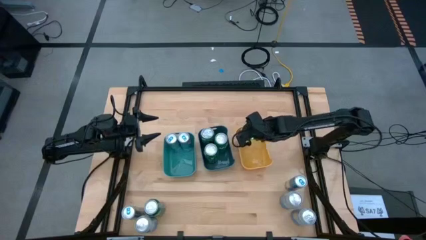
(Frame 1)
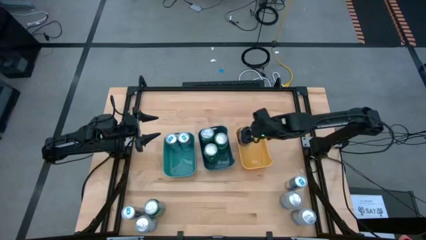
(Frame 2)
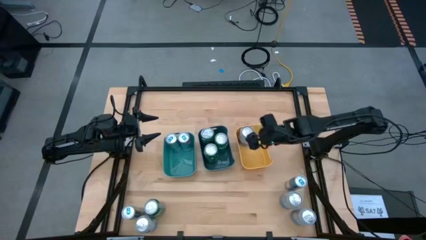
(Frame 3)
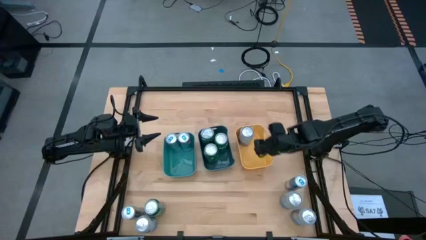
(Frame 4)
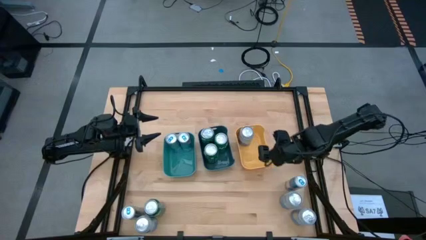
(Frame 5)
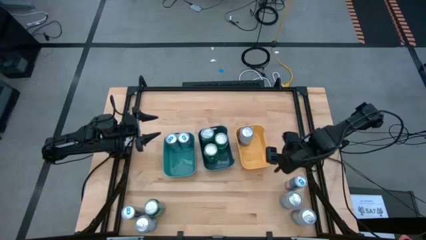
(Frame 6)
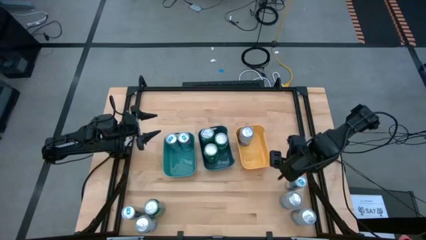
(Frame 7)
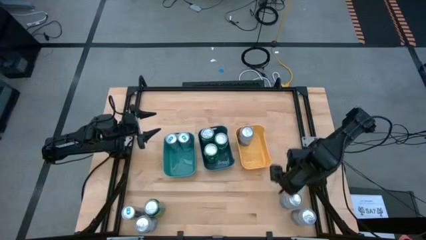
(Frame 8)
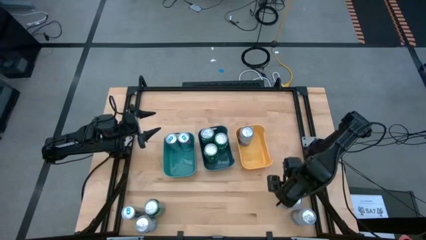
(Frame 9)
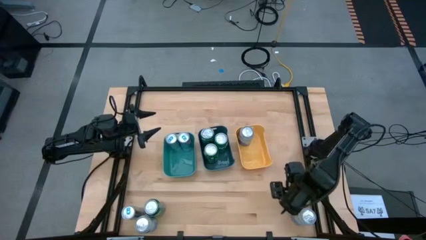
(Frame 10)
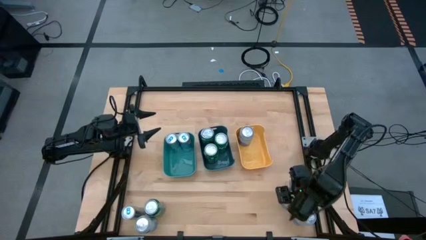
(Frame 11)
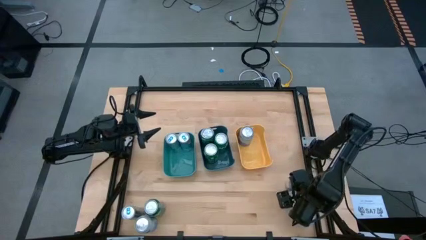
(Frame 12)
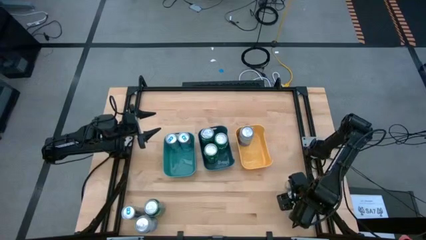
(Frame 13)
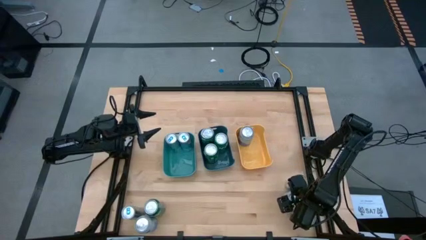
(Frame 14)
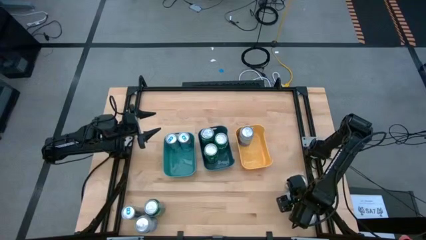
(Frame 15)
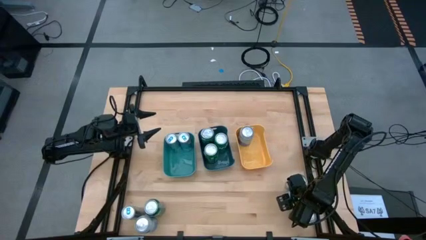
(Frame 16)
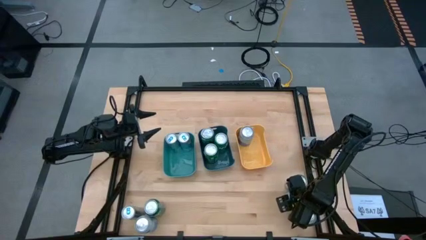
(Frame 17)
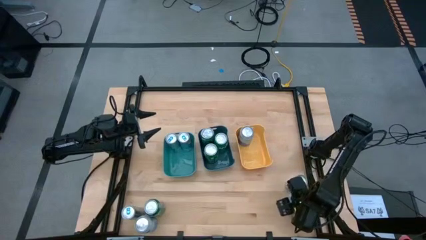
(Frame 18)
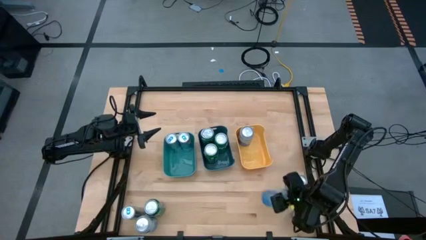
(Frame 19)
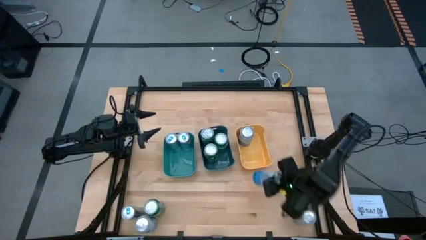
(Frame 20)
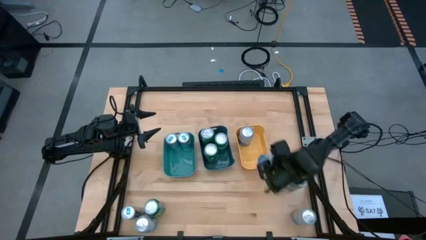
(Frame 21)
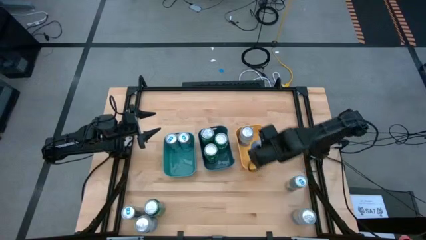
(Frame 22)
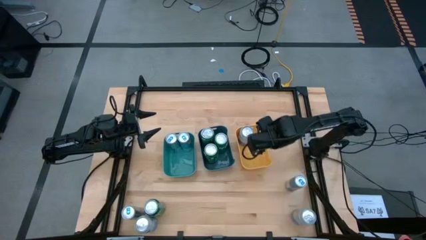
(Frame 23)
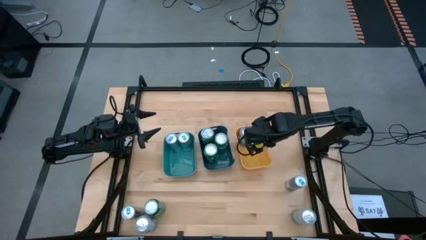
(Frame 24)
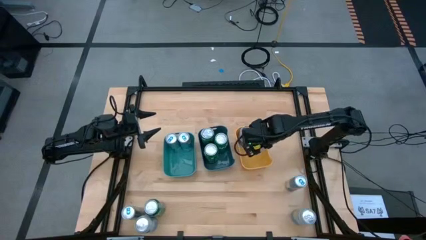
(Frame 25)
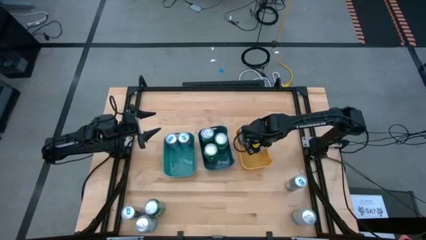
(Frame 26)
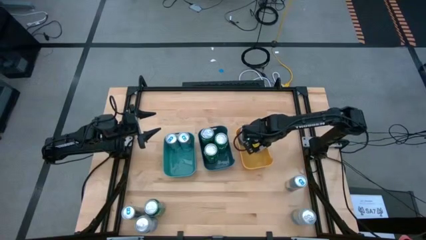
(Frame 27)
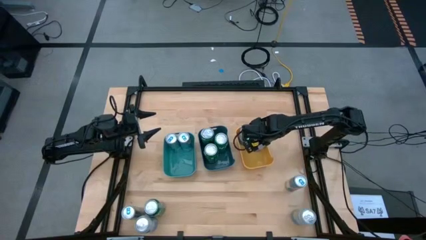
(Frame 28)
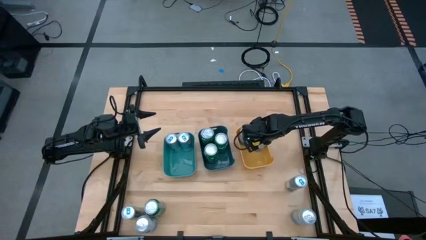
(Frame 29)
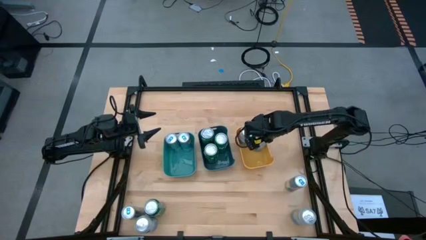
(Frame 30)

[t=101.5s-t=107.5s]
Task: Sort soda cans
Put the top blue/white soda can into the yellow bin

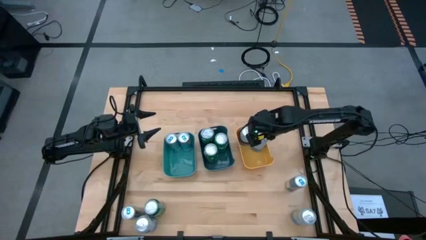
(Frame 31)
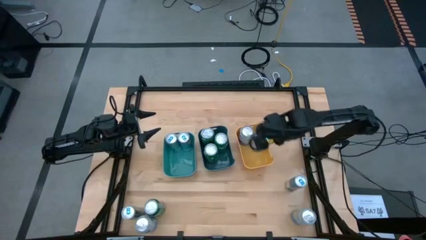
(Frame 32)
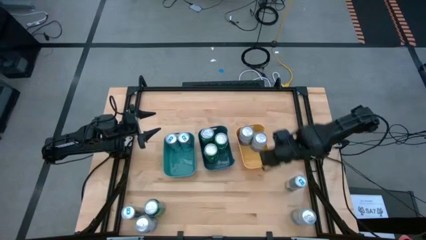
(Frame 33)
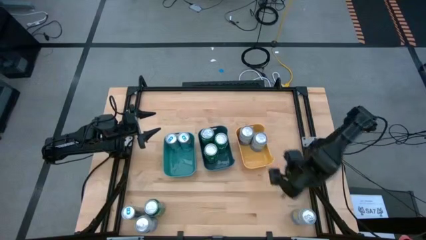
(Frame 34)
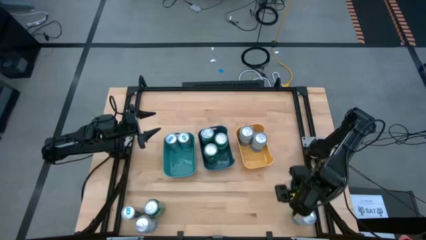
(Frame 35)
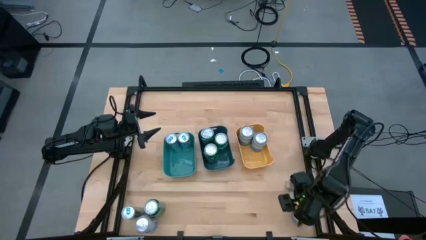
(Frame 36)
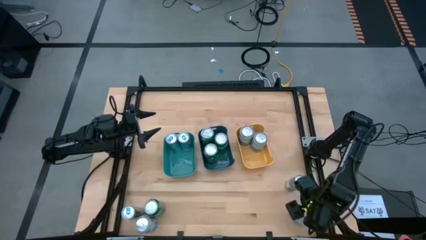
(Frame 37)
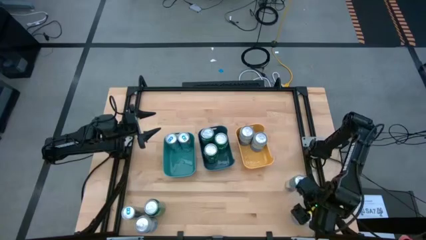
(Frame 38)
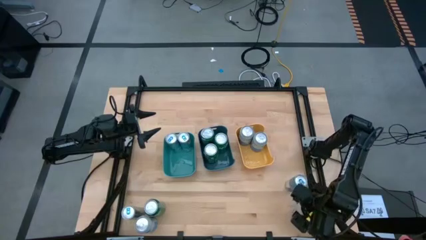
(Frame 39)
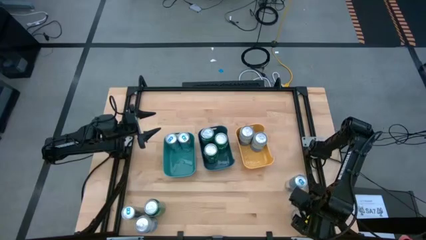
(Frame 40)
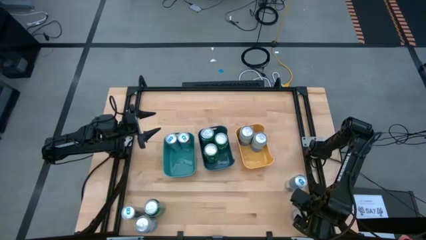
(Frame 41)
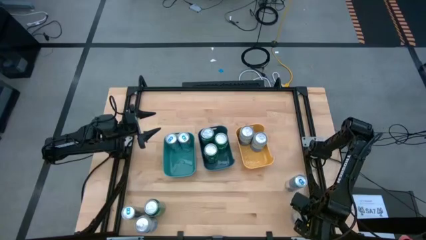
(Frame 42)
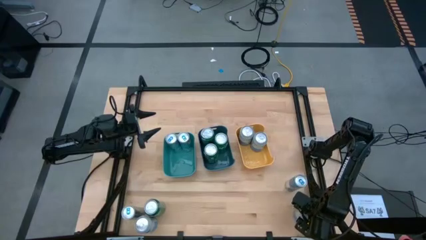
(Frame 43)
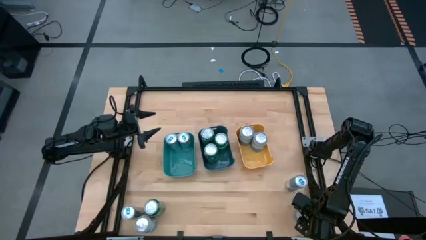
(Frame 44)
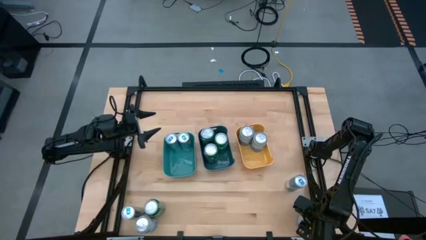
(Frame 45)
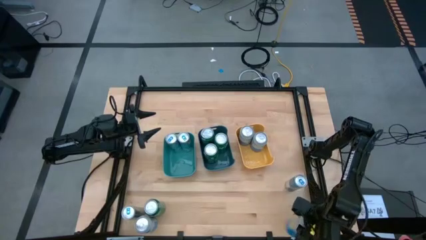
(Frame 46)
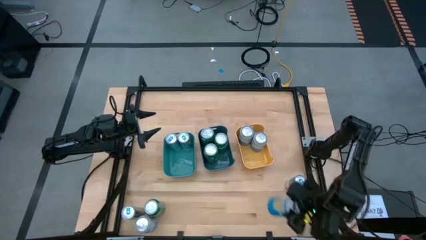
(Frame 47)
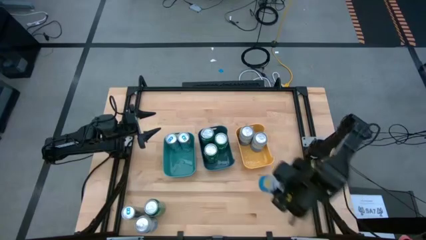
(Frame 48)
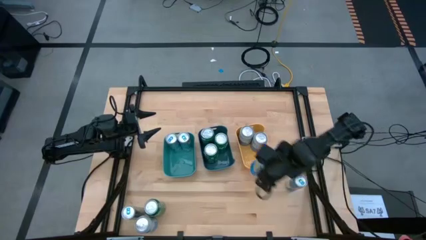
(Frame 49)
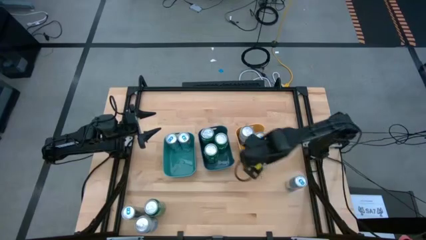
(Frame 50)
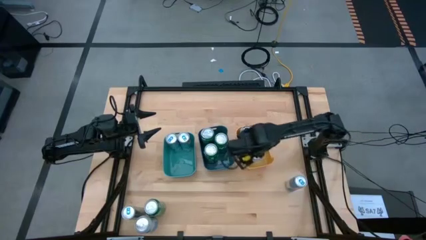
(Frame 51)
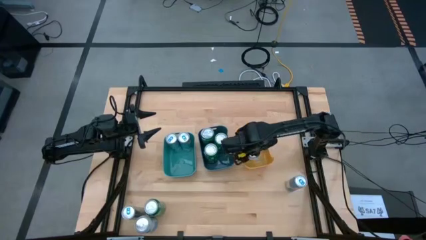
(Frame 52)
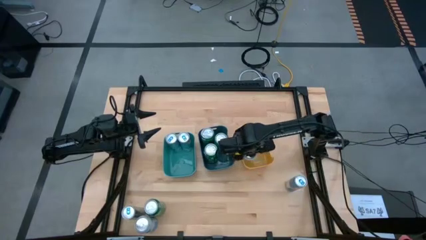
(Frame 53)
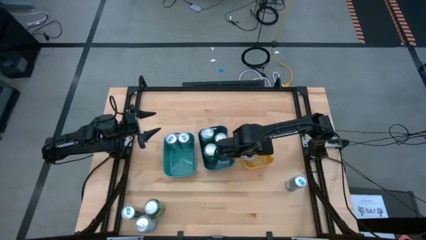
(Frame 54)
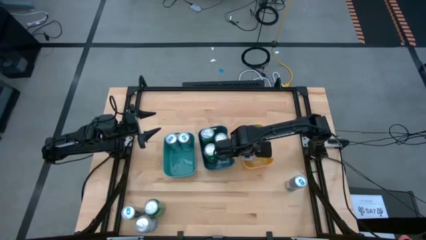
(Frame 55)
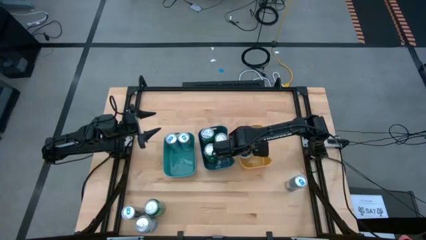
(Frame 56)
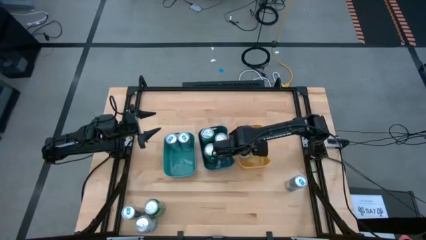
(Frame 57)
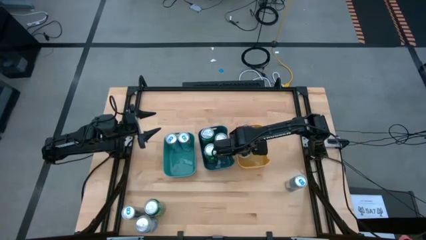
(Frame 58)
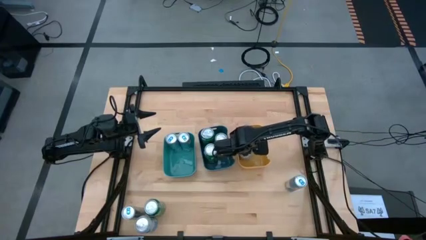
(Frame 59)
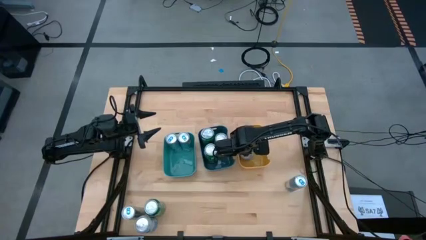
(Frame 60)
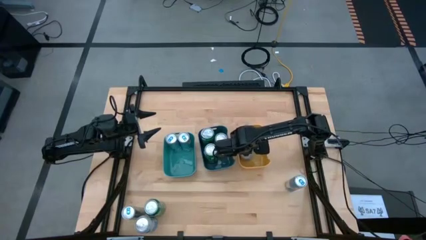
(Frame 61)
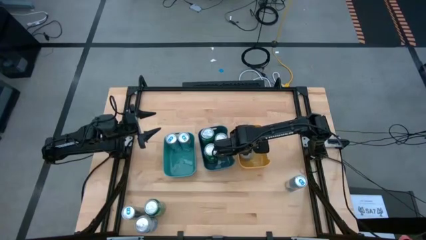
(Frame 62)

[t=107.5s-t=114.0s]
Put the right blue/white soda can into the yellow bin

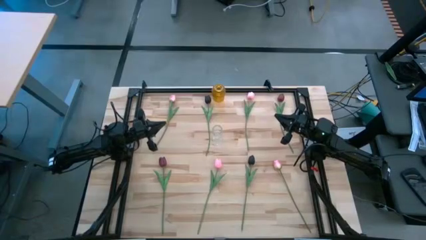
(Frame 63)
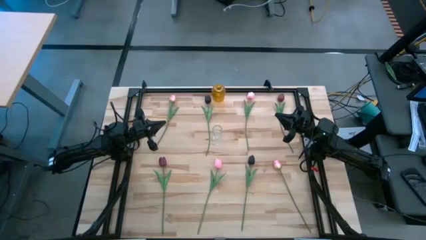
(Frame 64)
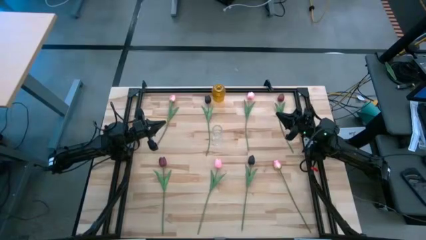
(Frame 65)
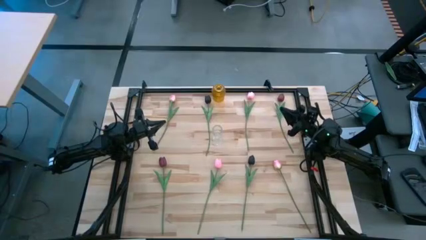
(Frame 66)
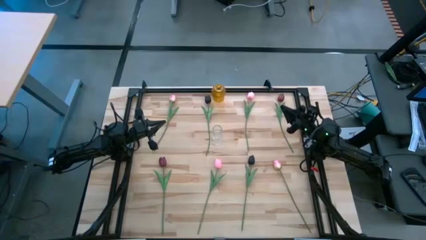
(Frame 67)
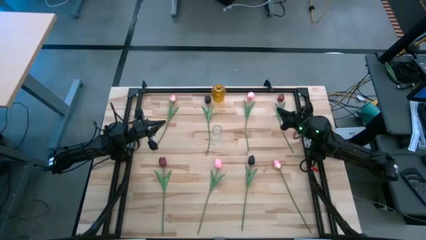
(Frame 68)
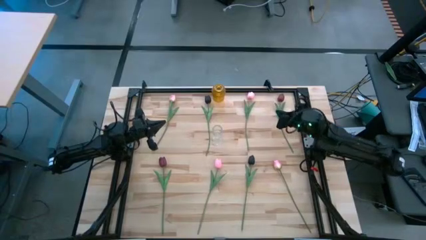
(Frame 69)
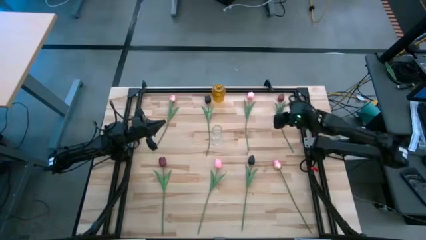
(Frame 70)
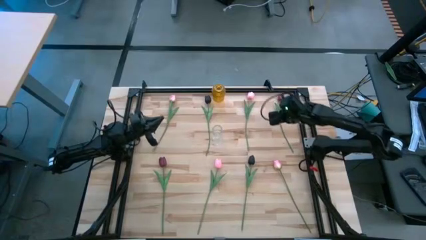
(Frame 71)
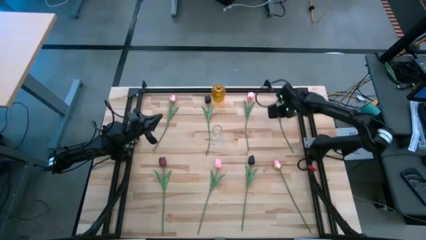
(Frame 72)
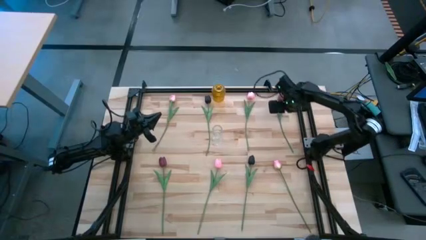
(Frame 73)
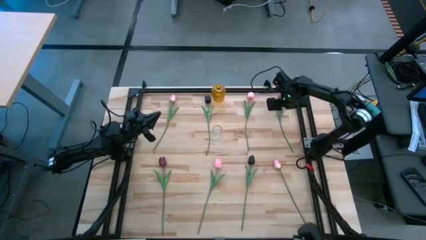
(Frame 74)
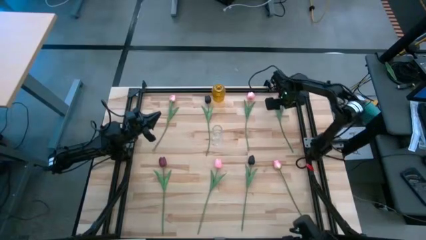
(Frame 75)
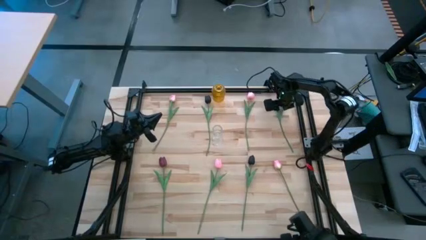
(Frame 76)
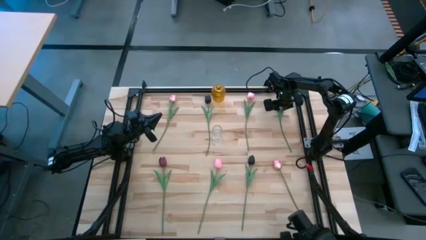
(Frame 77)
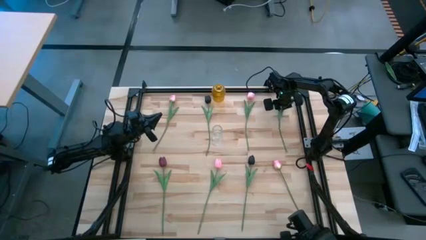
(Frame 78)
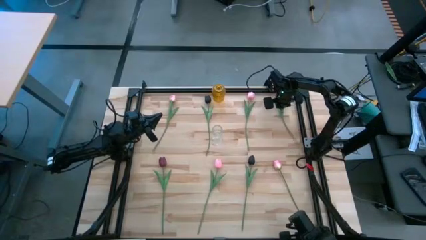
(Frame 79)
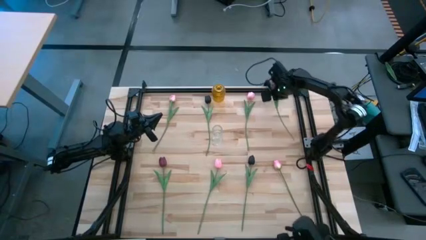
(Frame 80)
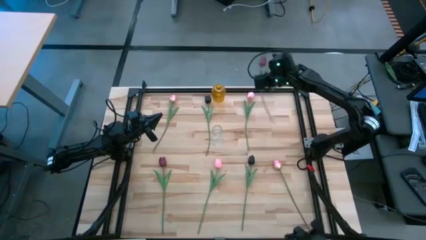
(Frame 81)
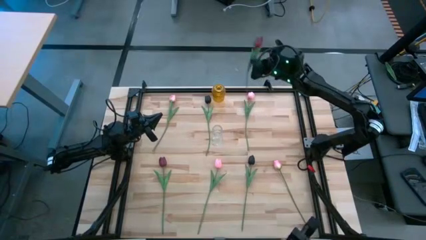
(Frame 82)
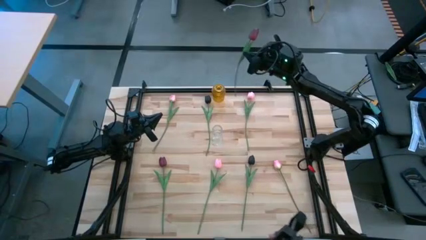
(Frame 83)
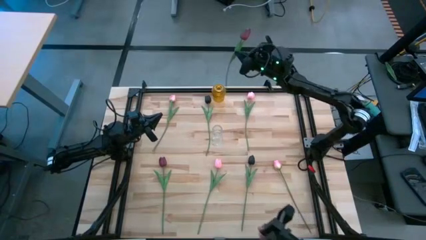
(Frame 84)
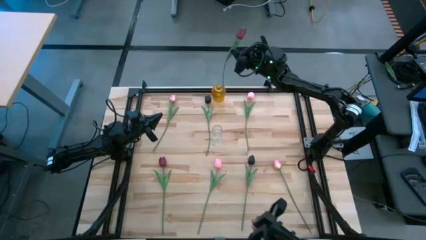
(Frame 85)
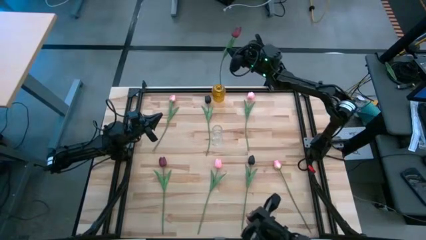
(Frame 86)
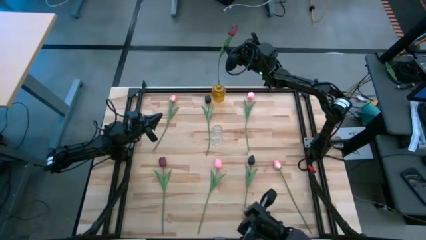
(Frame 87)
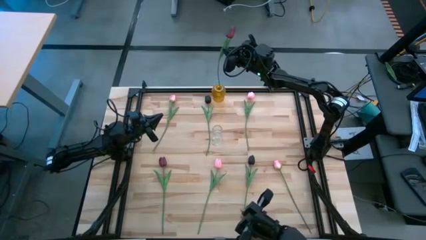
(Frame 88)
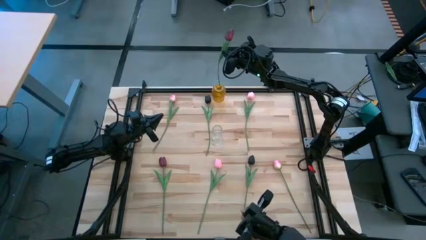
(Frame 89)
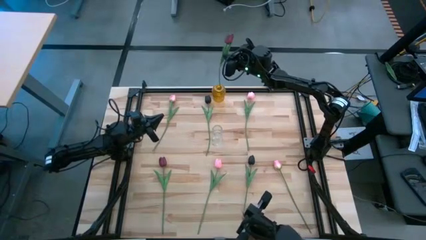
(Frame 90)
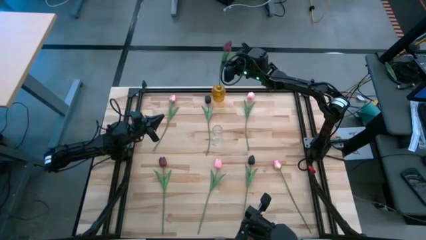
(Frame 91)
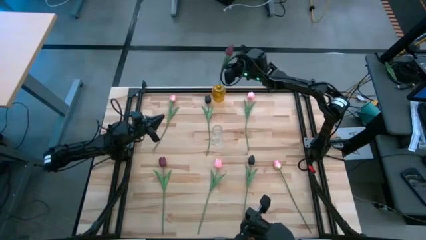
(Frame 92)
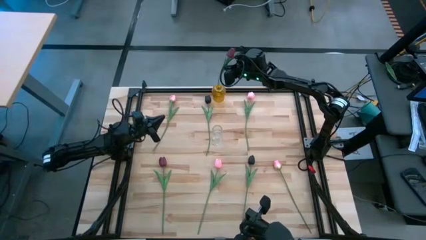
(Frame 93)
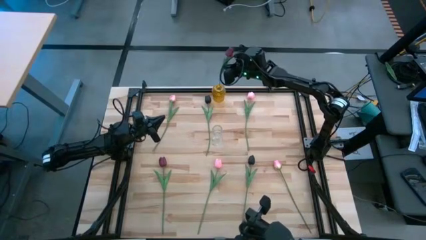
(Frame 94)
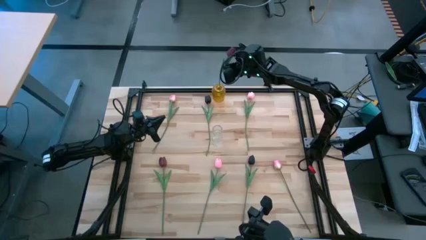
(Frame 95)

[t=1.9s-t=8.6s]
Task: Sort flowers into vase by color
Put the top red flower into the yellow transparent vase
